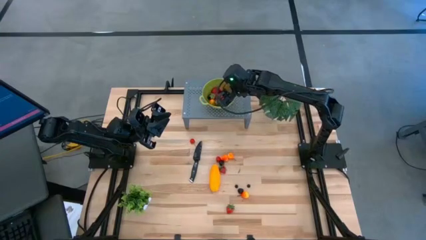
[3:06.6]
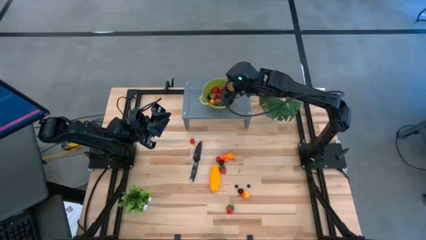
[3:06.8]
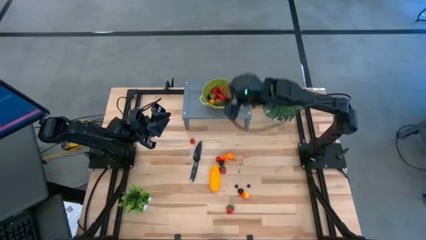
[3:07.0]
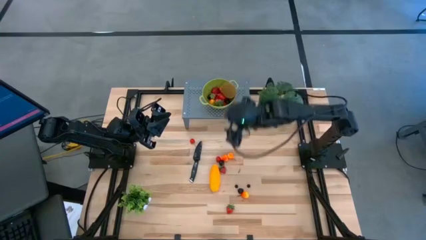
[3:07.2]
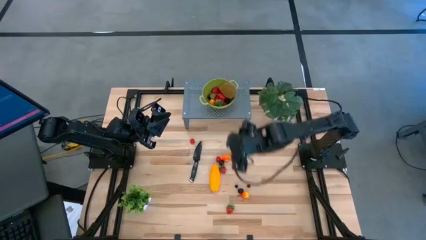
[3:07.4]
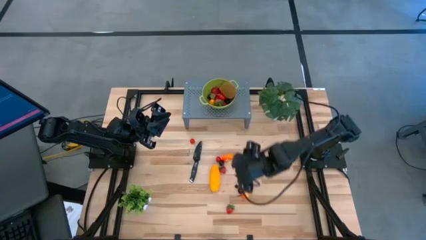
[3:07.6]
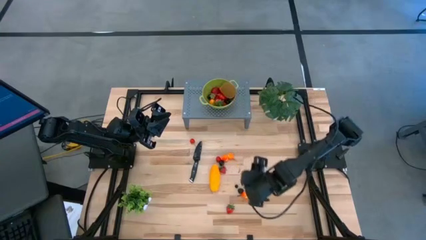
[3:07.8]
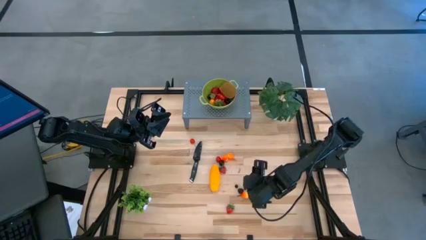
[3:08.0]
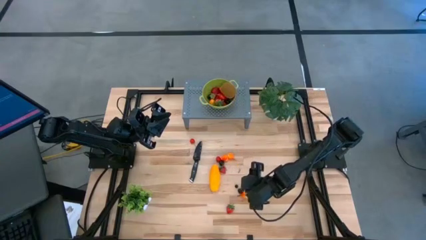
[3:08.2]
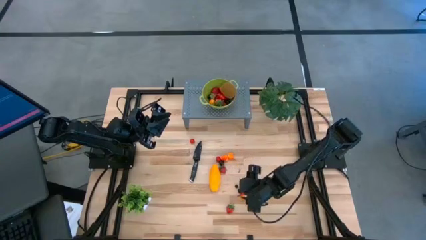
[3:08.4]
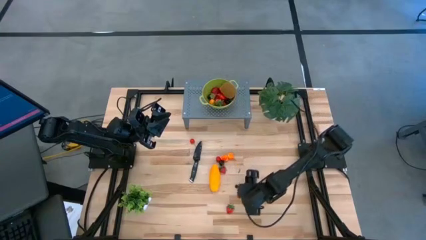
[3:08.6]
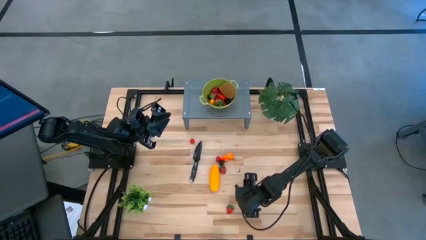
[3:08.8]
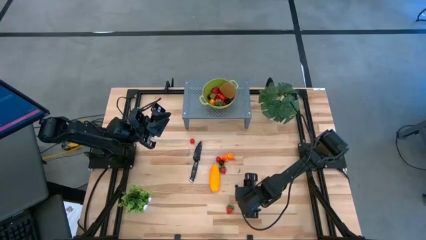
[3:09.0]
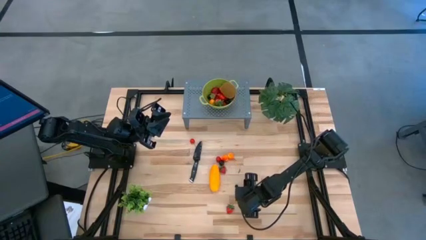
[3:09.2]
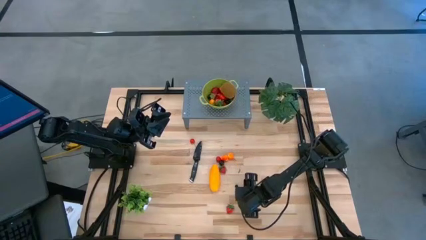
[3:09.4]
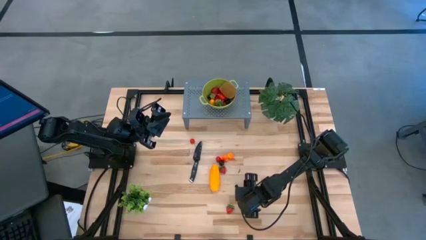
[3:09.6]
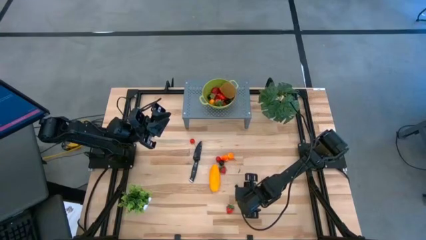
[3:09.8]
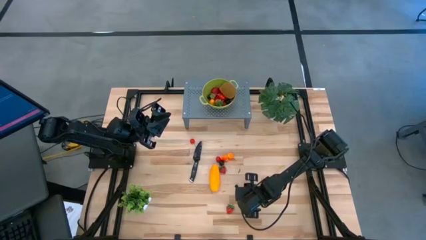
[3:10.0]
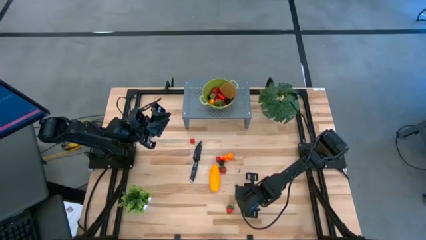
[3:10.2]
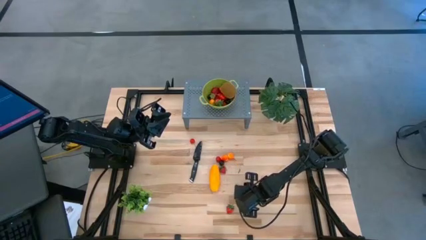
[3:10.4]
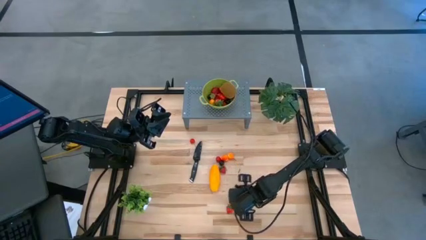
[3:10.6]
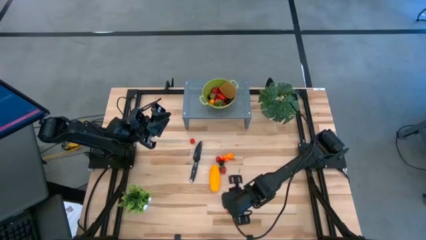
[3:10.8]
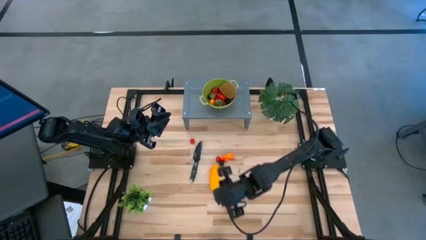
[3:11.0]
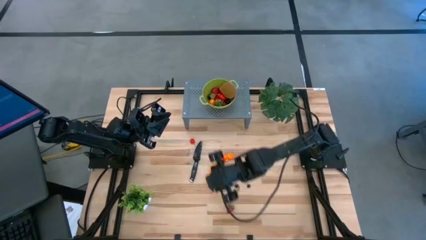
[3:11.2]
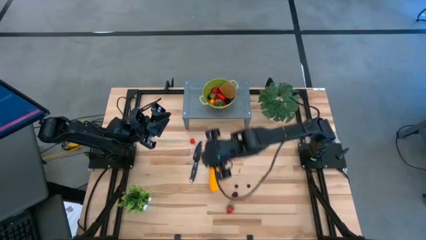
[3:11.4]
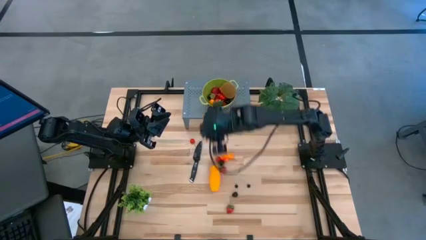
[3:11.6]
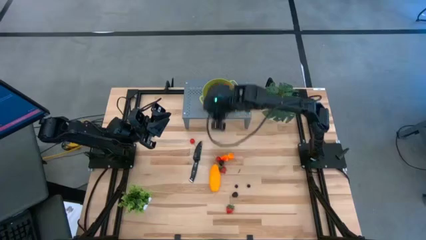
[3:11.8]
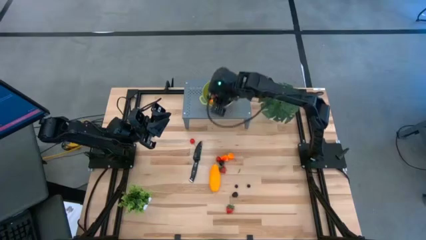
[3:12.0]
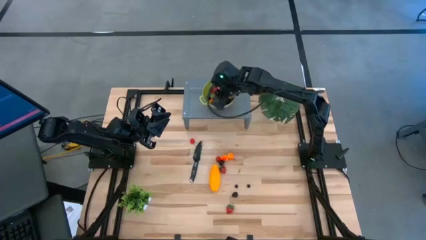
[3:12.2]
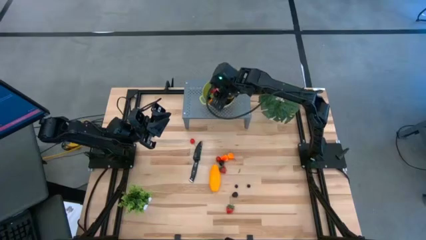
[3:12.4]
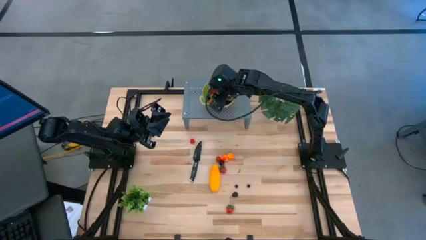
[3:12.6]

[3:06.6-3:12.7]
Task: Pick & Place Fruit
Put the peach into the green strainer bowl on the shelf

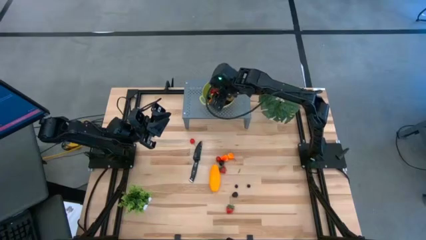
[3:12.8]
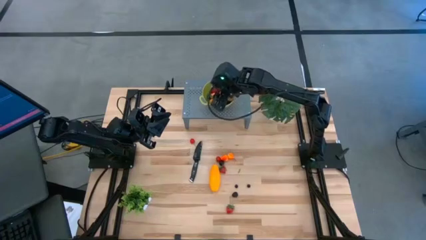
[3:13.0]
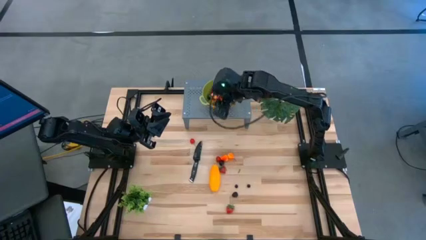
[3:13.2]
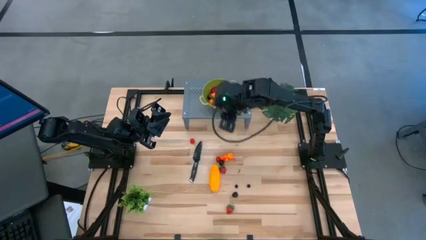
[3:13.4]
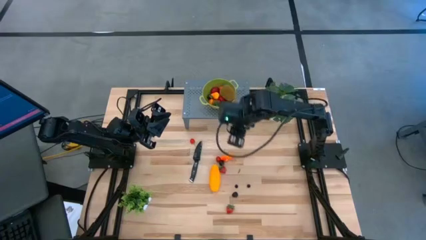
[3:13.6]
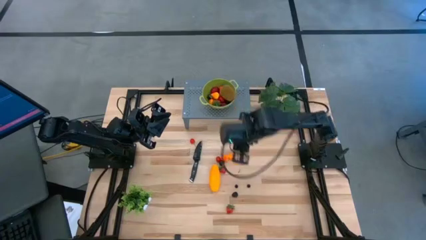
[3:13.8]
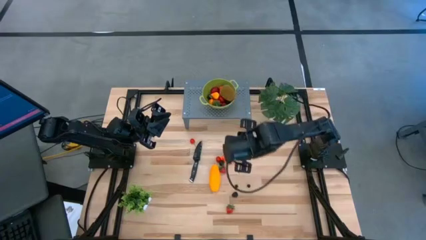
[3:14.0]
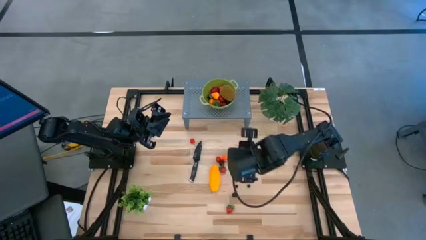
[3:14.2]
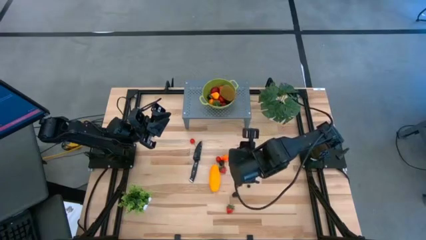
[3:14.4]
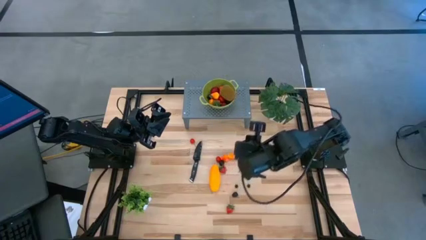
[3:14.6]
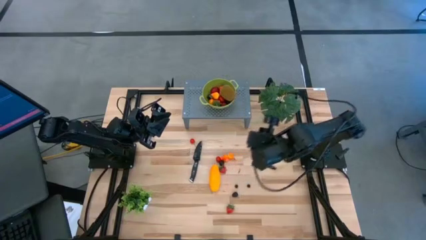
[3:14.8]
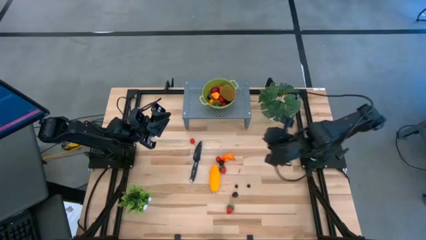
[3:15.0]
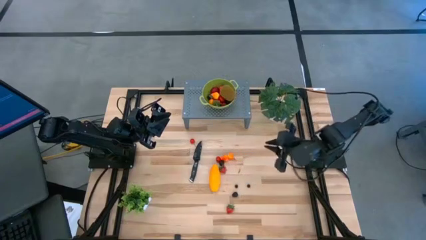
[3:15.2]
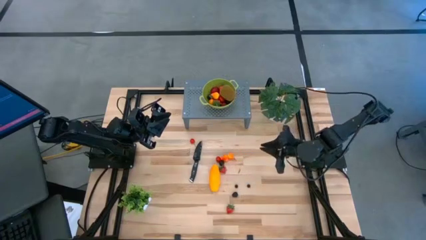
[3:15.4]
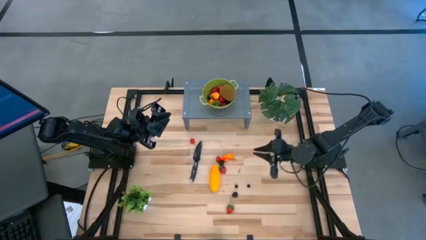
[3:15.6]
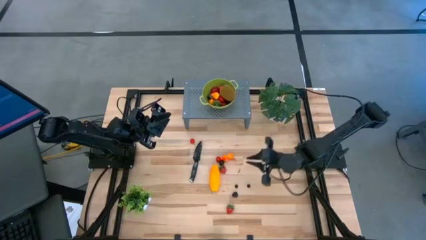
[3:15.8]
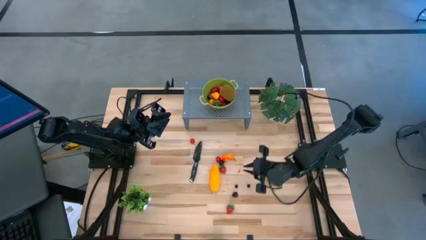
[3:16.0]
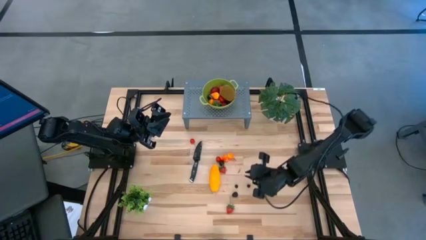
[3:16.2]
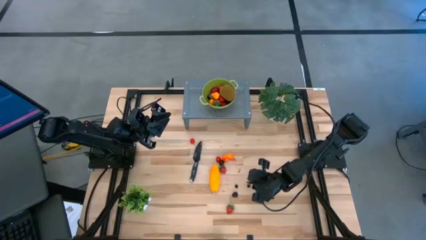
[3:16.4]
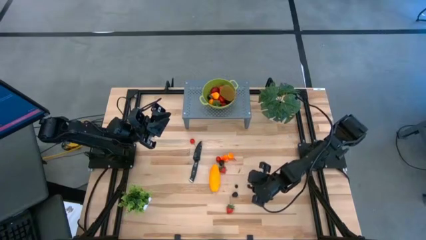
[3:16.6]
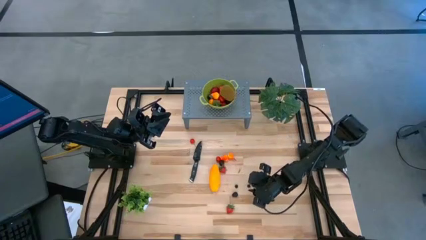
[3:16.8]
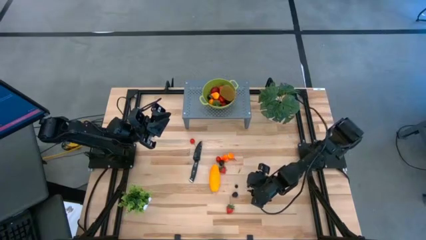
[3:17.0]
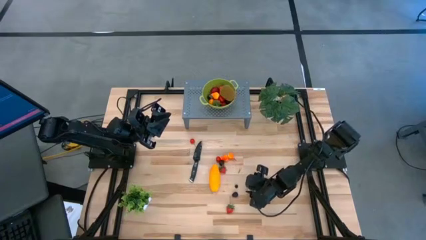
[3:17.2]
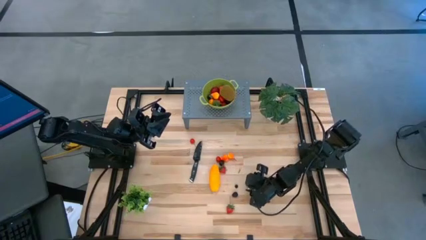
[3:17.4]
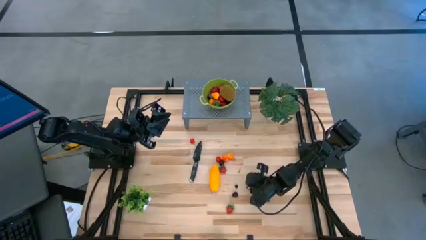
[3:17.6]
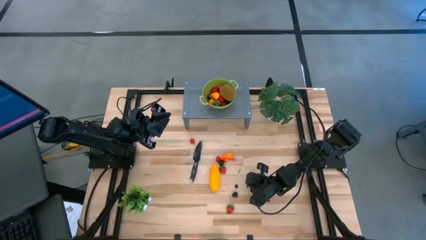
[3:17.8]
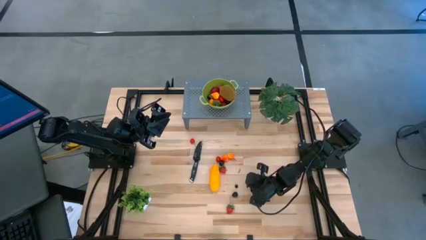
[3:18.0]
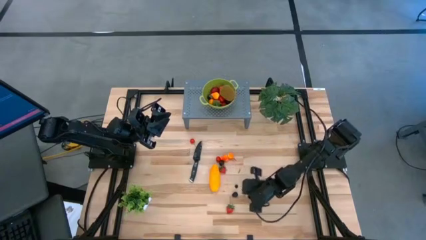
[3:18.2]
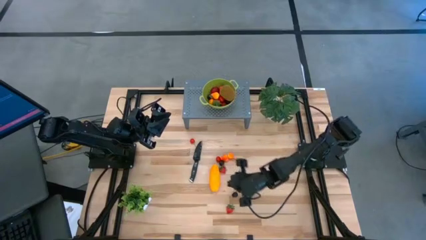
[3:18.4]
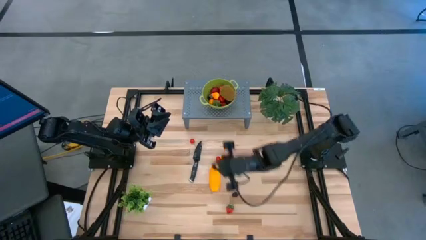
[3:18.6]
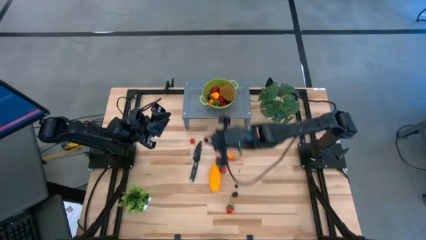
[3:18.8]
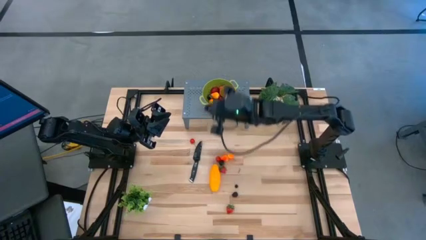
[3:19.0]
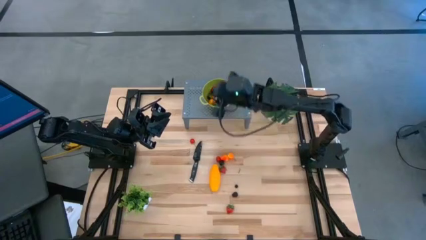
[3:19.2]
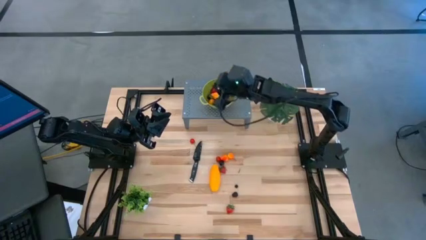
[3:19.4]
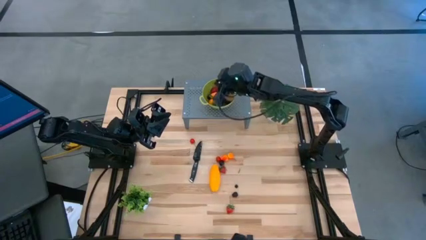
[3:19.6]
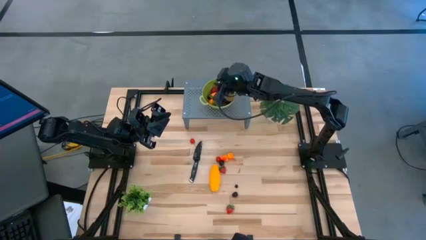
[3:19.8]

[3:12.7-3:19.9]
Put the blueberry into the green strainer bowl on the shelf

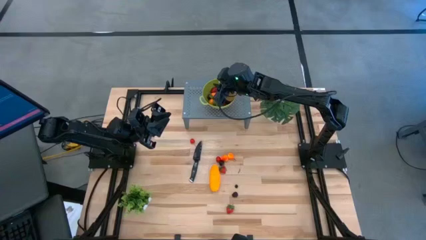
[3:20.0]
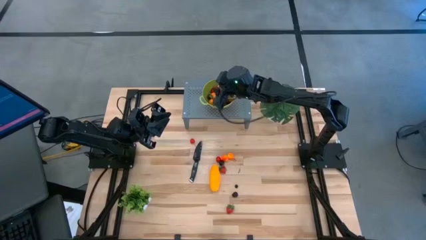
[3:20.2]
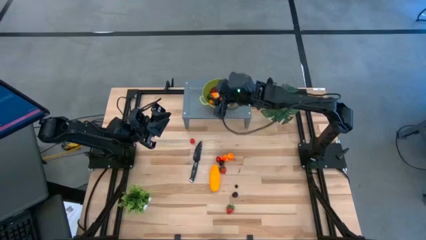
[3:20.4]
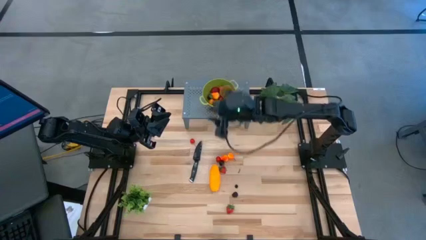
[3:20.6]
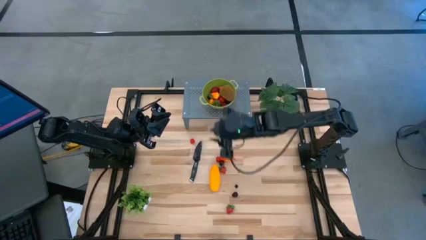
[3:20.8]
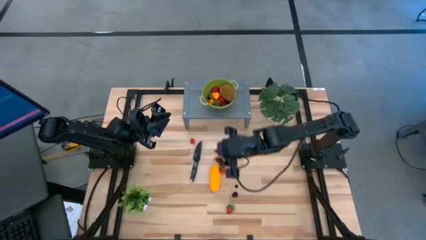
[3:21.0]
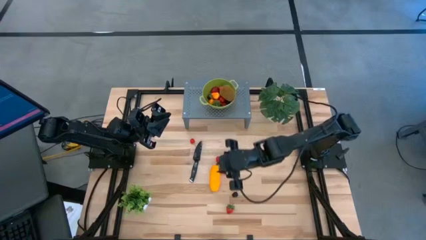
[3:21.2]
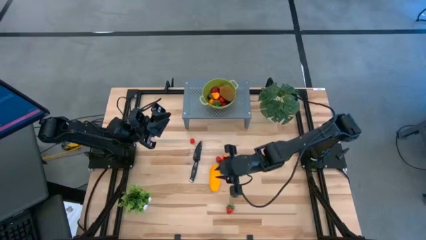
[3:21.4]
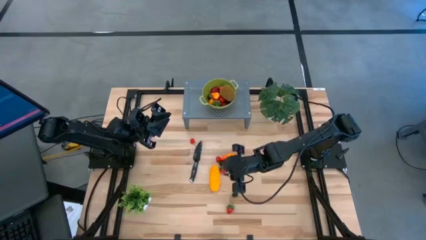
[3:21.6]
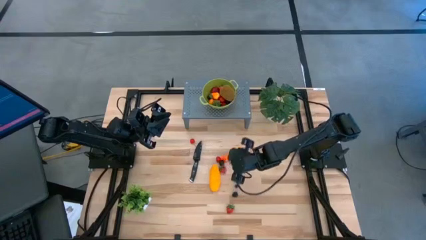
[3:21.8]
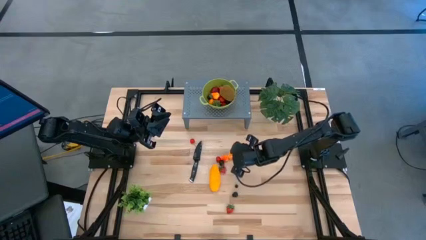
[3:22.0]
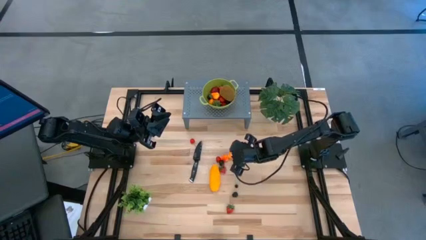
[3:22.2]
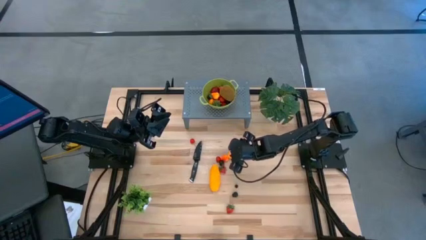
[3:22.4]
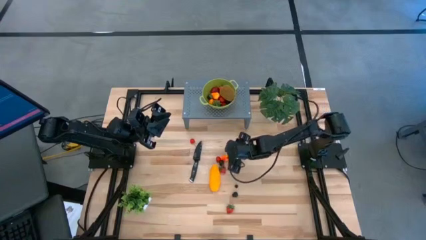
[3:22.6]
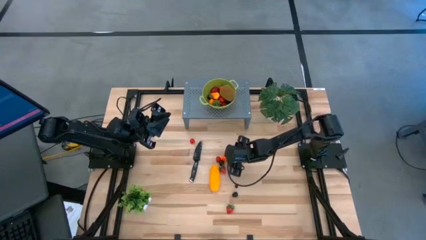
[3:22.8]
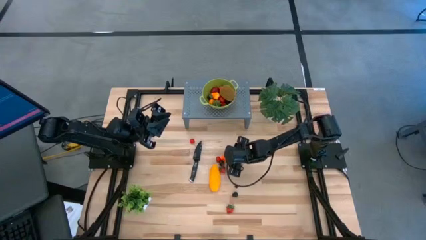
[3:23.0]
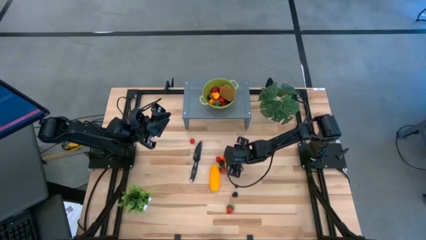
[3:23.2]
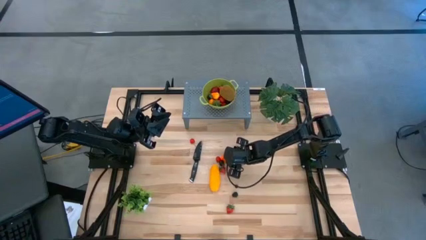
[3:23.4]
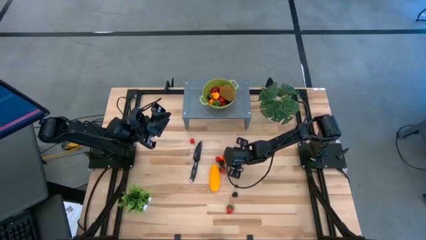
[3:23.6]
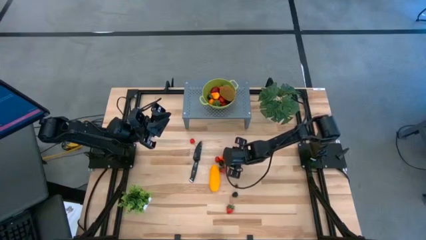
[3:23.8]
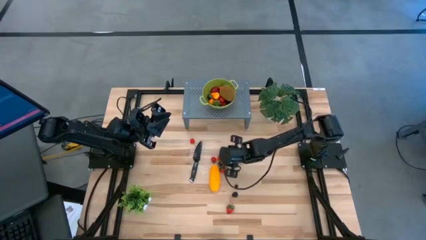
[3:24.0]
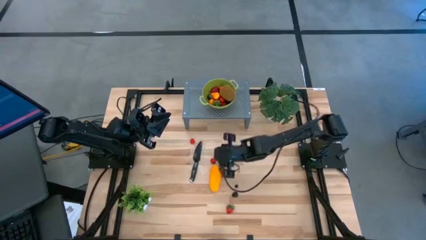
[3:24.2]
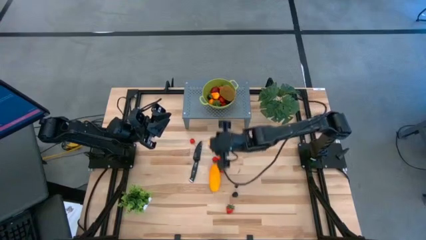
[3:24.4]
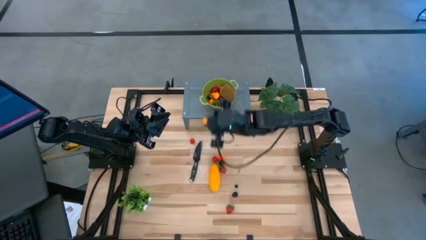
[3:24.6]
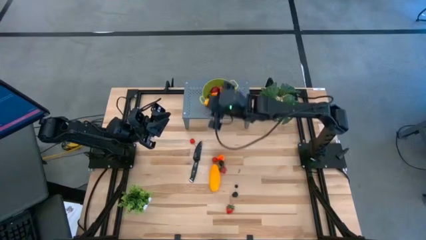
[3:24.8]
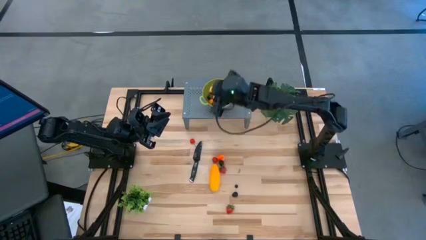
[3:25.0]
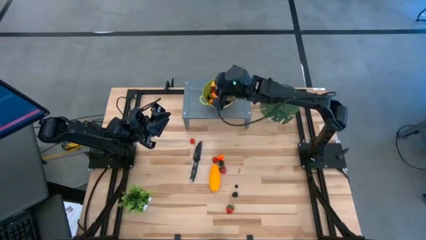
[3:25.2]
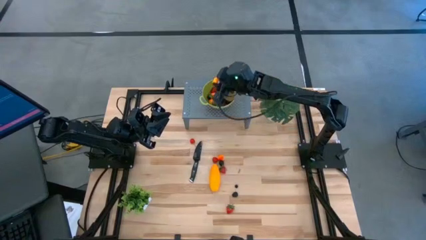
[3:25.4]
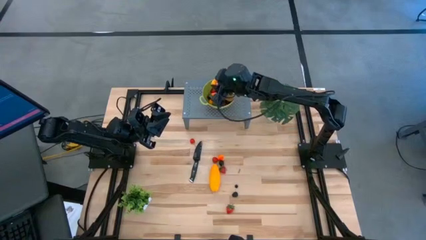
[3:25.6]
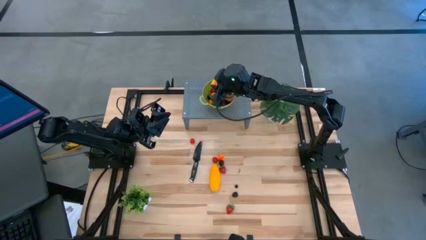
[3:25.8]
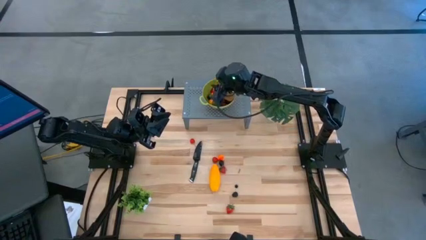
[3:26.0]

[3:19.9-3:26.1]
Put the peach into the green strainer bowl on the shelf
